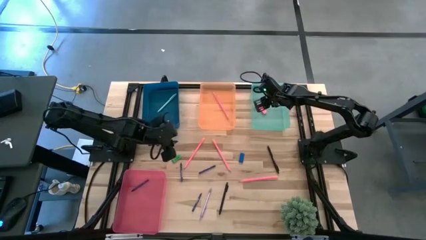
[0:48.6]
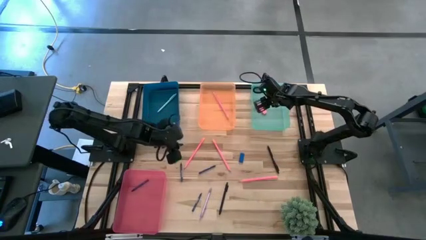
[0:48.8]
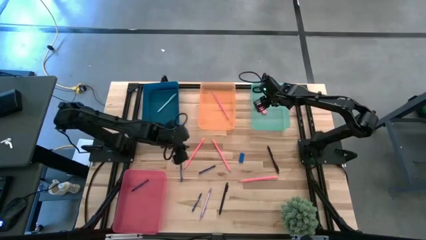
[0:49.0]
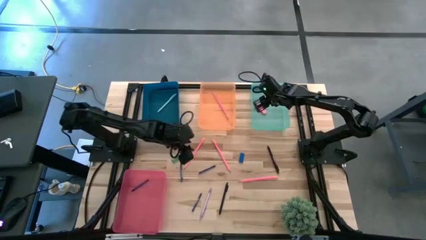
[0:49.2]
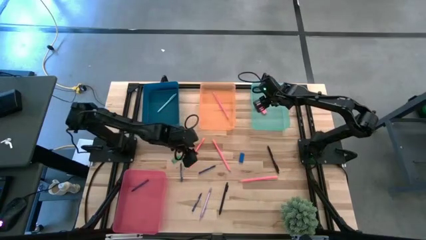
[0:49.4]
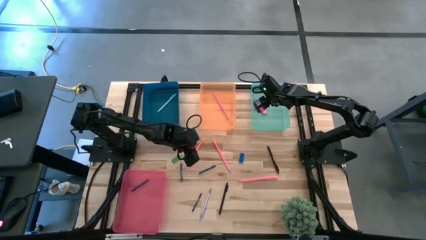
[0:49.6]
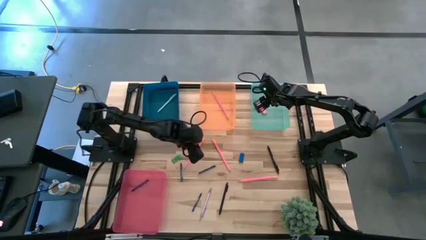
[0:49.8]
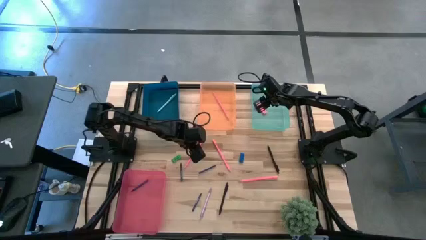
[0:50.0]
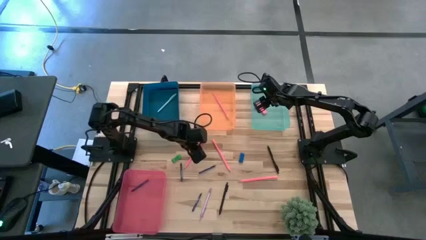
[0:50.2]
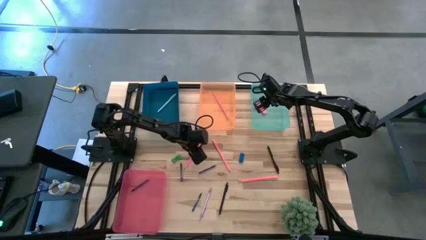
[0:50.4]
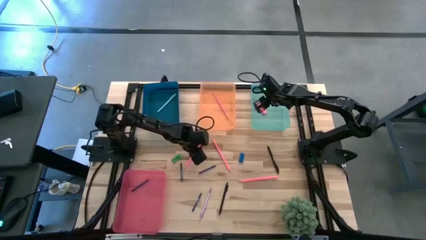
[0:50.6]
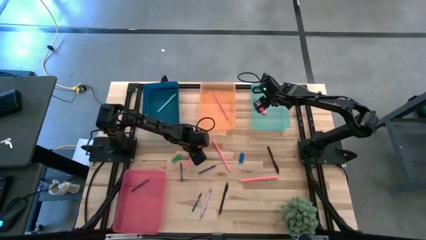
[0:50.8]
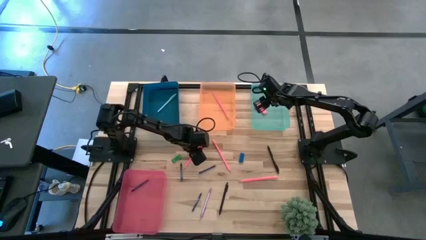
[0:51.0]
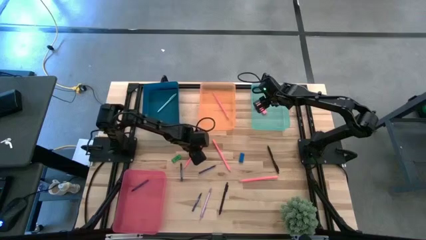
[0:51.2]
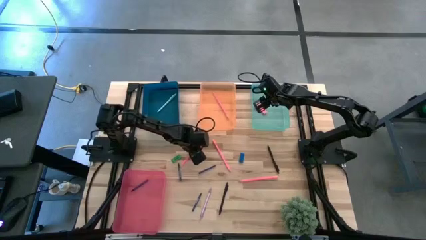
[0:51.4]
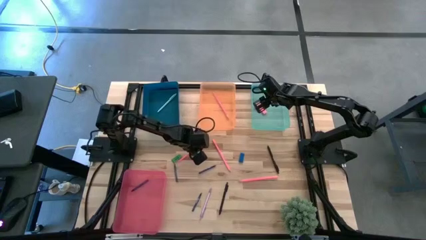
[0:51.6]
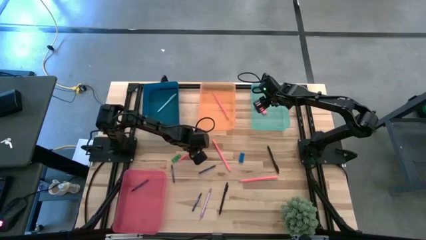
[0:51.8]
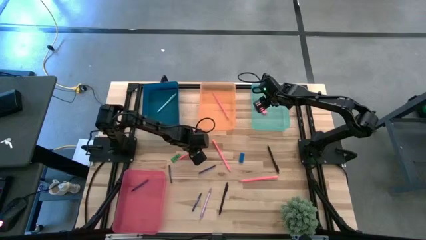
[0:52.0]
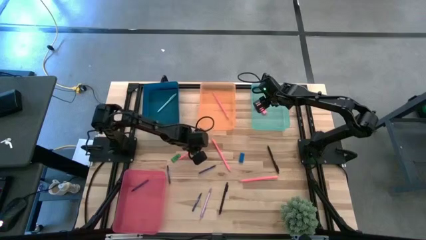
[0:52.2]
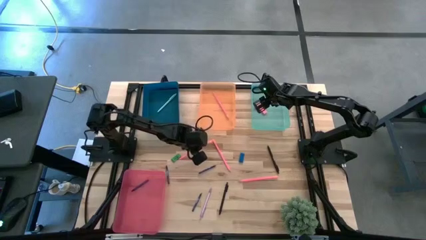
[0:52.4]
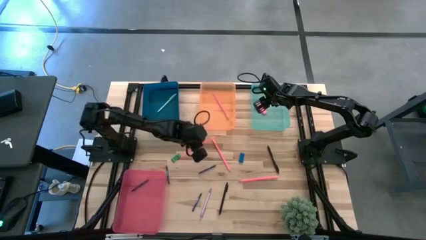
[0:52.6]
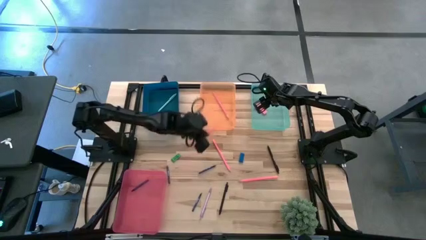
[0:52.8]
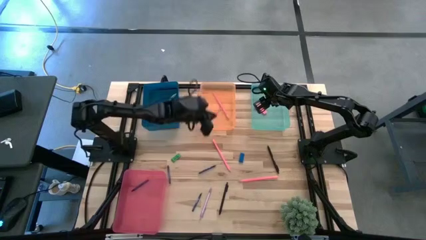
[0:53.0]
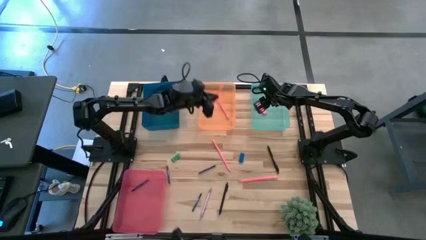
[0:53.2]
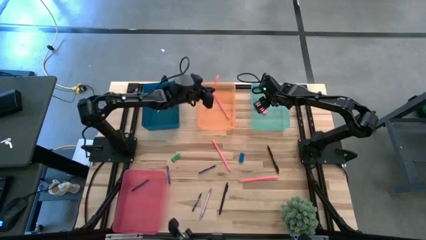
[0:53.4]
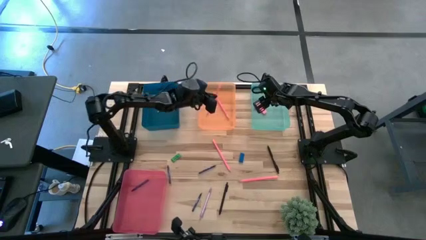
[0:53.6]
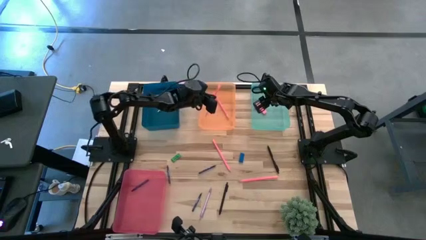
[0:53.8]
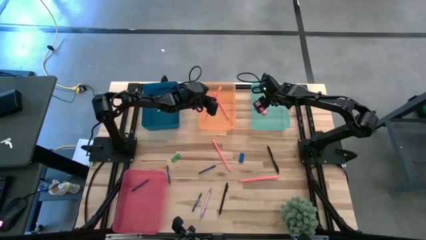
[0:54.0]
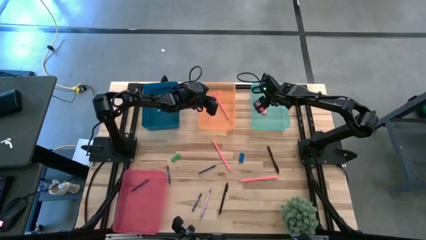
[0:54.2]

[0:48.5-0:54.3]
Task: Sort crayons/erasers/pens/pencils in bins
Put the top left pencil into the orange bin

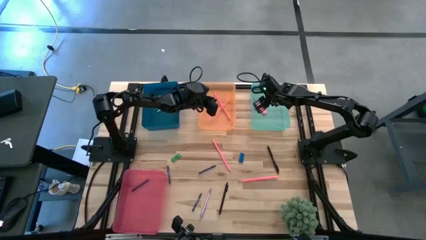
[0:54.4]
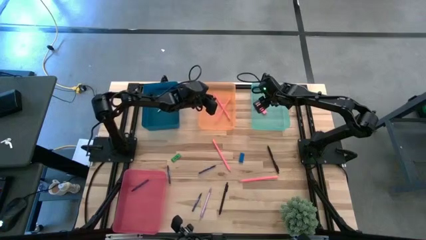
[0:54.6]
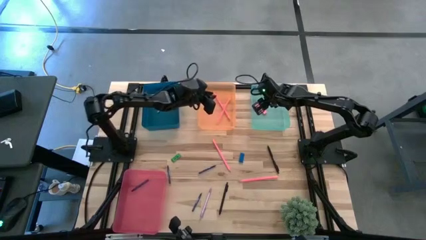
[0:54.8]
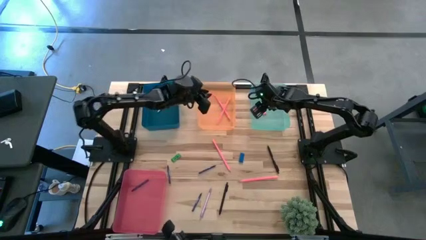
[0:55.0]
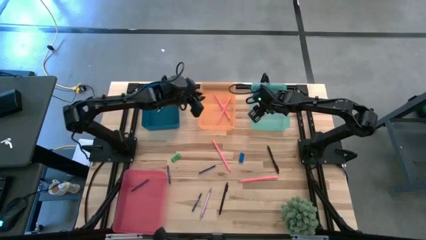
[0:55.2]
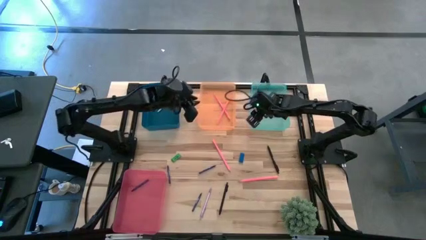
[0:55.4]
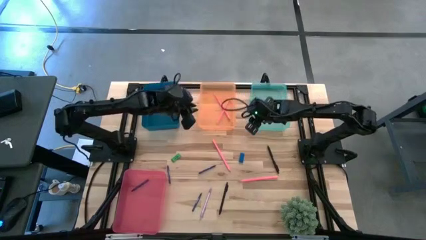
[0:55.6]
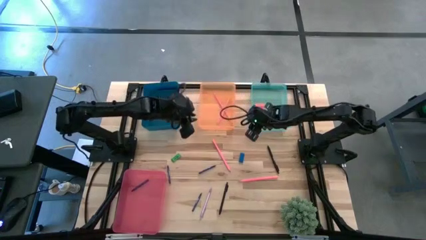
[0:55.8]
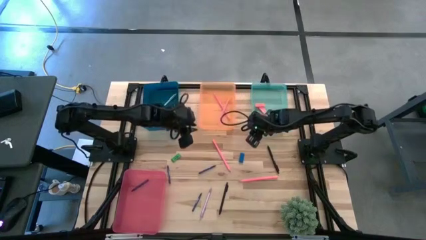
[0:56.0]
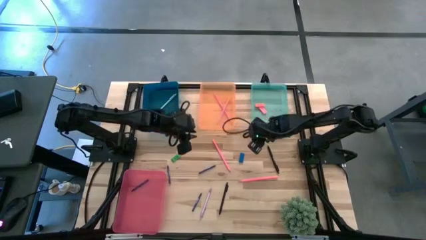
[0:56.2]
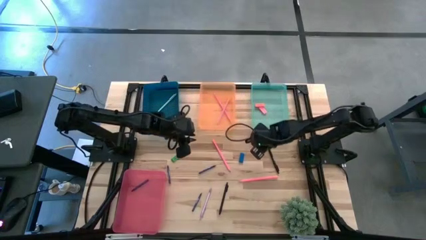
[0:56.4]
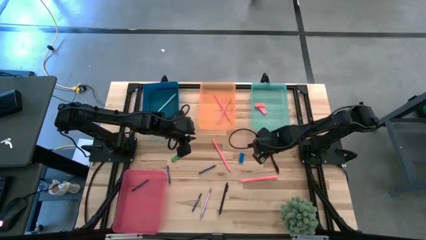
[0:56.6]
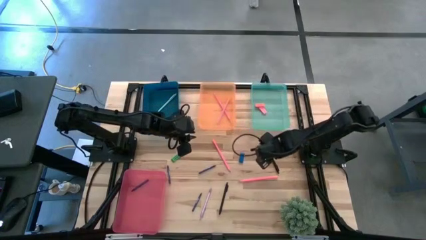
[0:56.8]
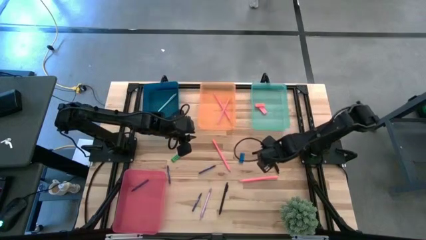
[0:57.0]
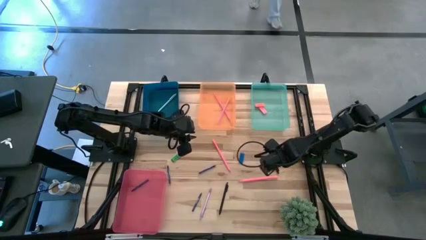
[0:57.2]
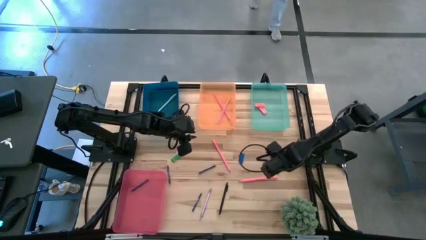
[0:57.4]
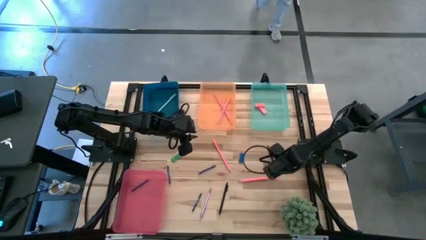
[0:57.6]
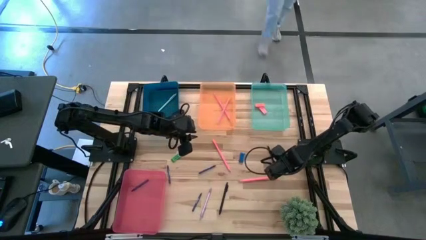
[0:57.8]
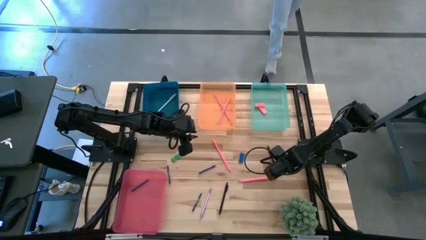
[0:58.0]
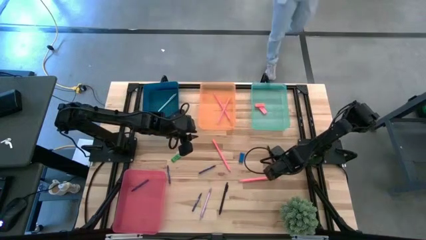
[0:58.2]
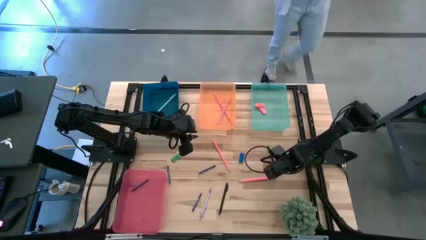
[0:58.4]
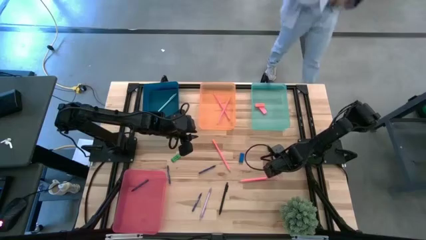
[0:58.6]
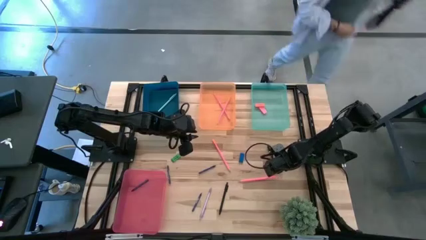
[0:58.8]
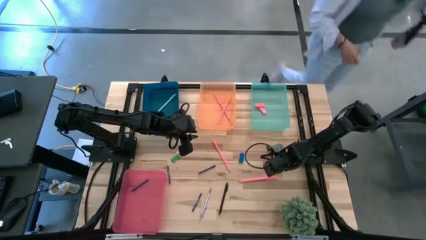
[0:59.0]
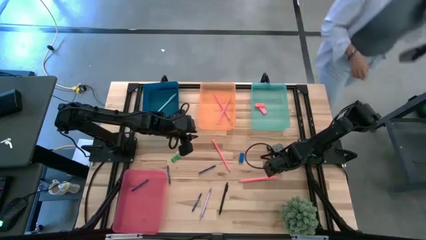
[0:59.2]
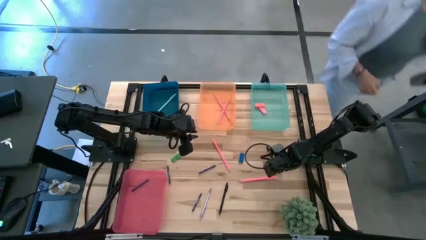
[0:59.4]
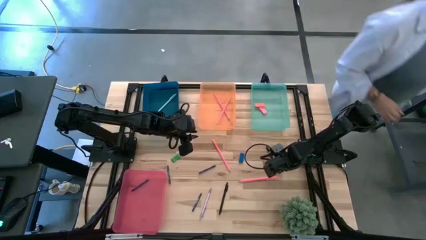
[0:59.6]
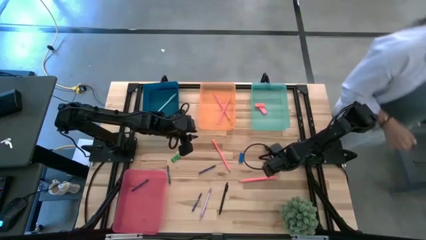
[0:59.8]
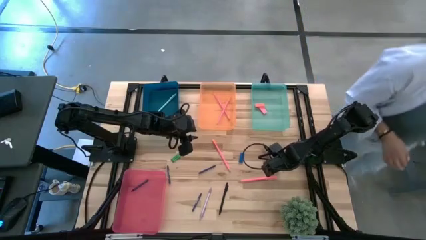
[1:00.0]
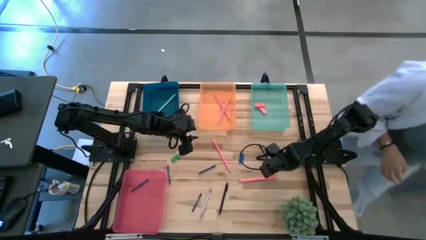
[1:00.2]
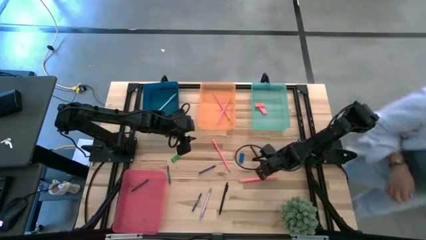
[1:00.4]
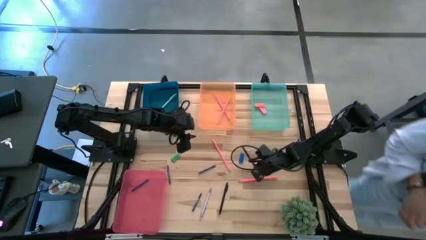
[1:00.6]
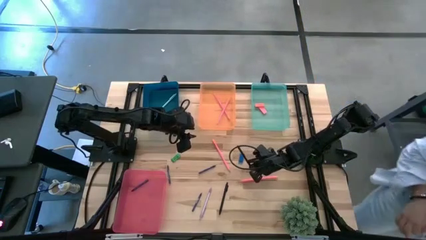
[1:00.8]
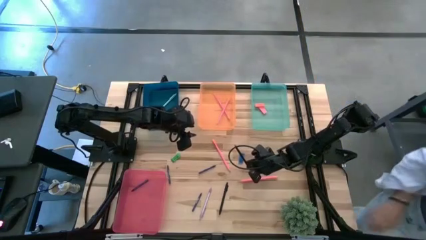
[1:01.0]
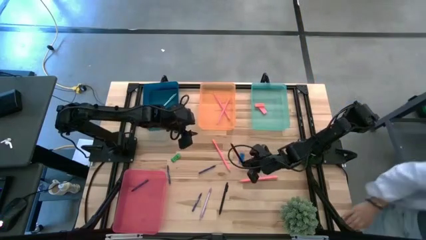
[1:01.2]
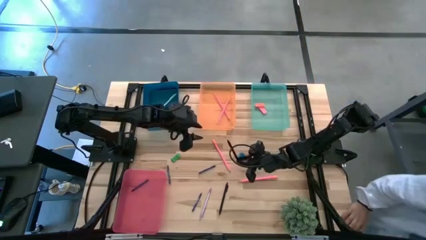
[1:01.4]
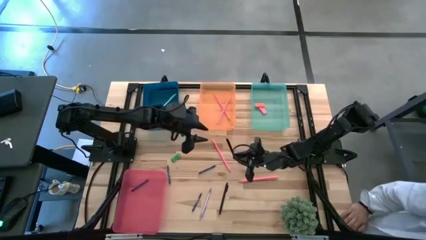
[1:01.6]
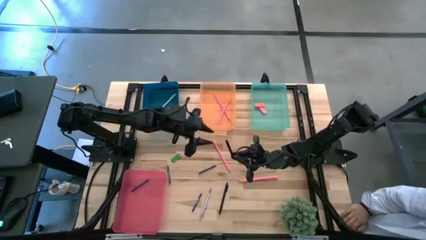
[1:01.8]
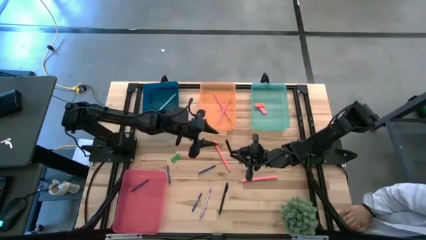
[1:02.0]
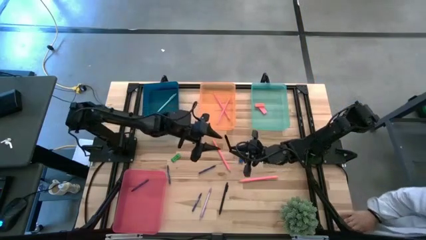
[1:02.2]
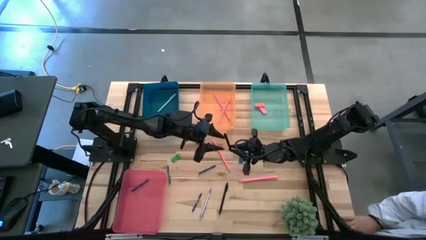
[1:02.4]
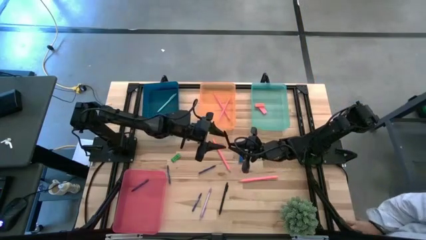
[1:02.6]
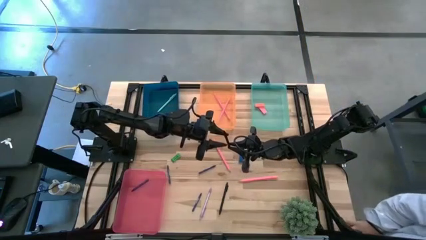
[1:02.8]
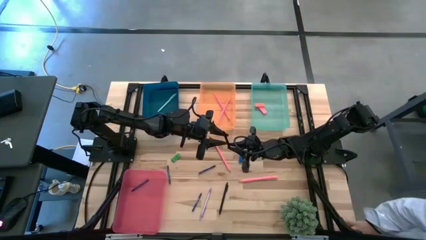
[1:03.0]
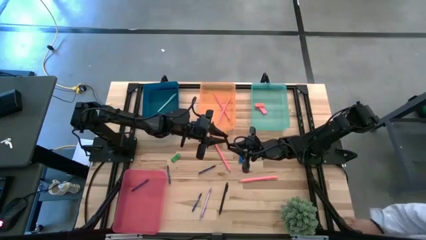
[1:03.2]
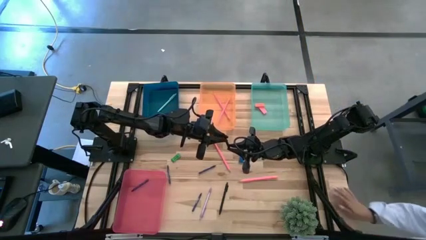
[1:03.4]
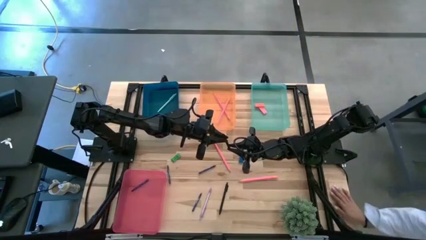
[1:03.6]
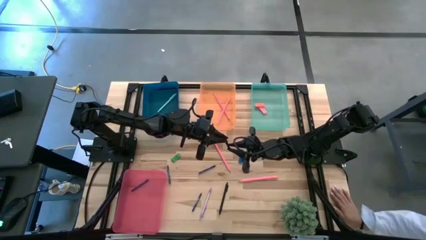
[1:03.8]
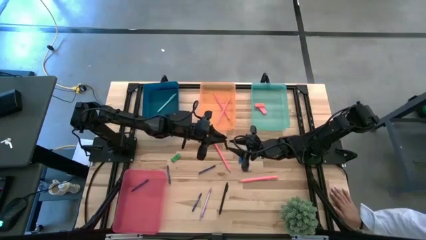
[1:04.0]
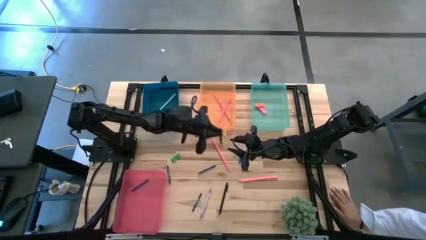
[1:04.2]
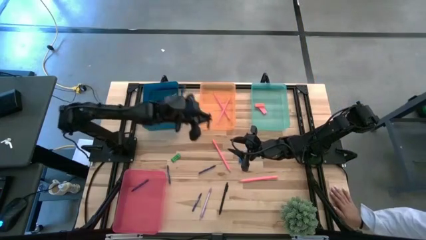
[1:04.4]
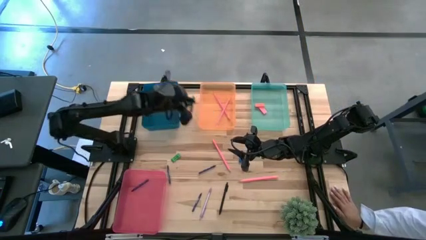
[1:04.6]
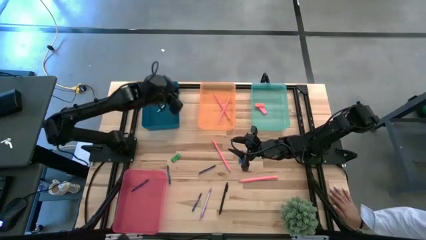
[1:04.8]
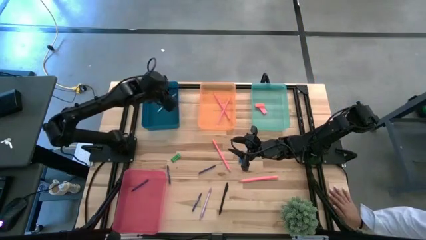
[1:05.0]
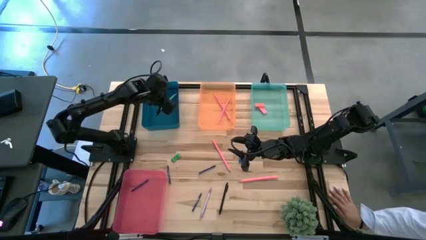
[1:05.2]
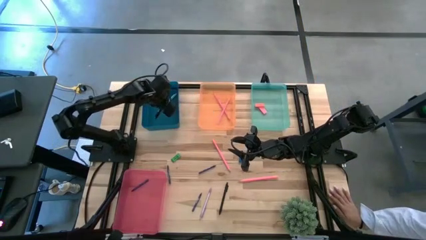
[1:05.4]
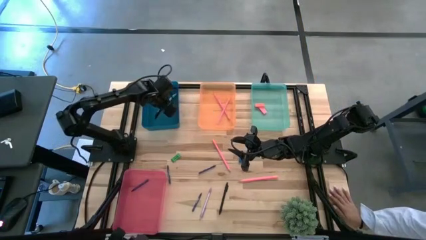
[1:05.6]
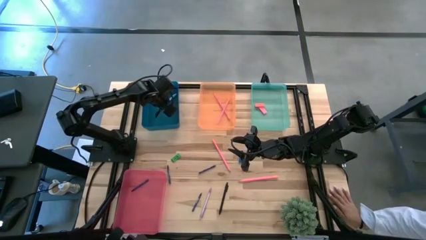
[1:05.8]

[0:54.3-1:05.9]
Put the top black pen into the blue bin
